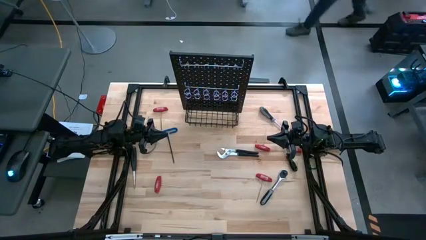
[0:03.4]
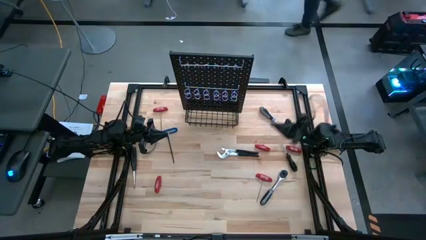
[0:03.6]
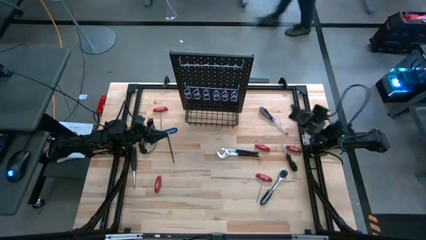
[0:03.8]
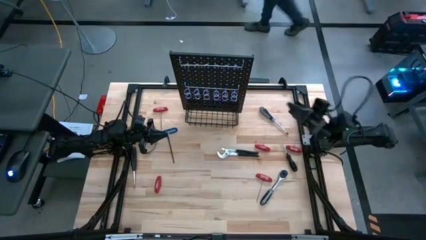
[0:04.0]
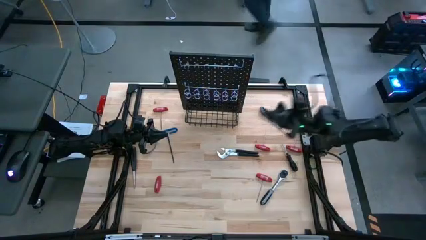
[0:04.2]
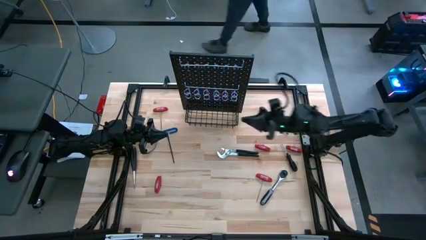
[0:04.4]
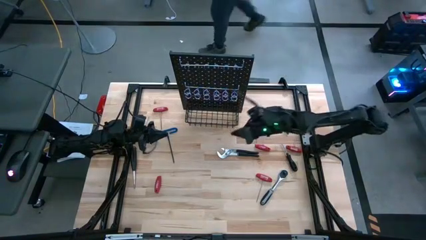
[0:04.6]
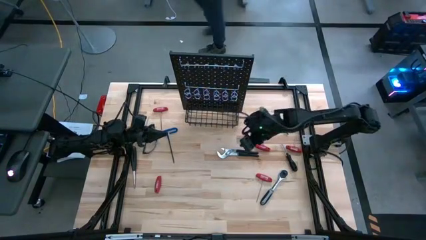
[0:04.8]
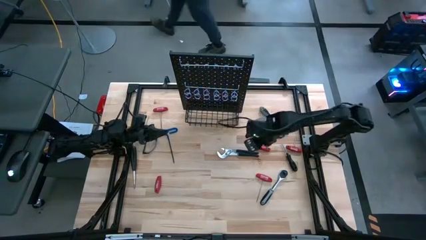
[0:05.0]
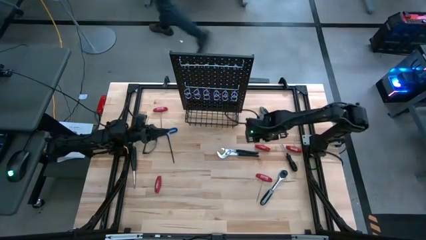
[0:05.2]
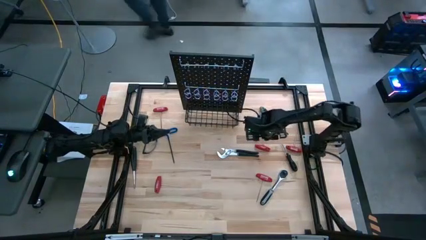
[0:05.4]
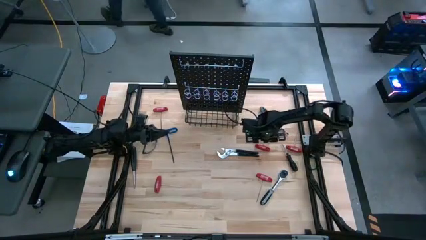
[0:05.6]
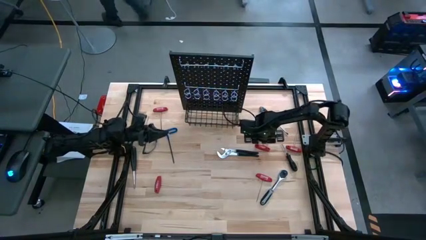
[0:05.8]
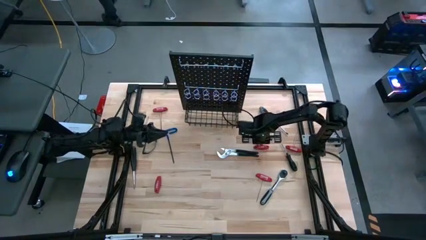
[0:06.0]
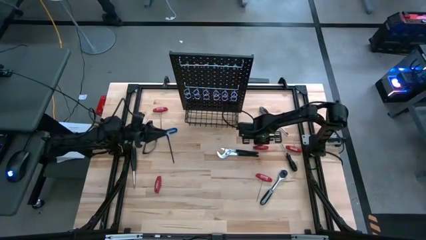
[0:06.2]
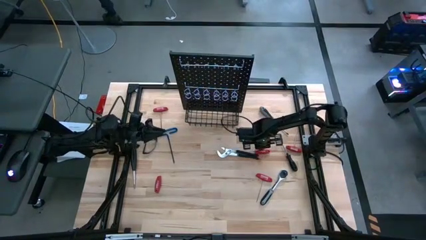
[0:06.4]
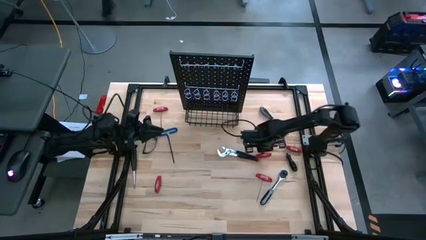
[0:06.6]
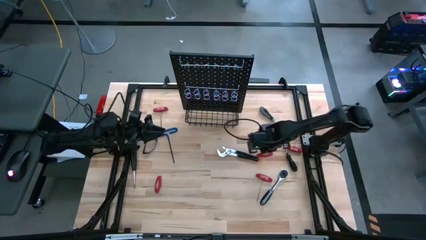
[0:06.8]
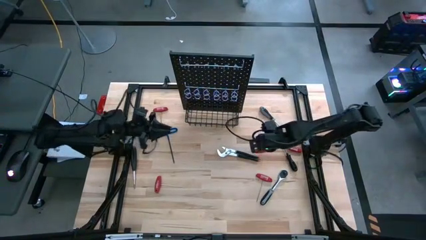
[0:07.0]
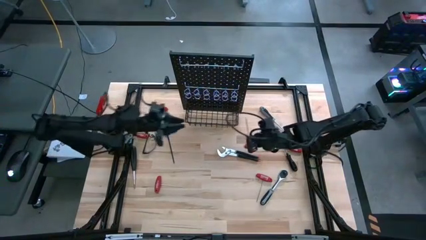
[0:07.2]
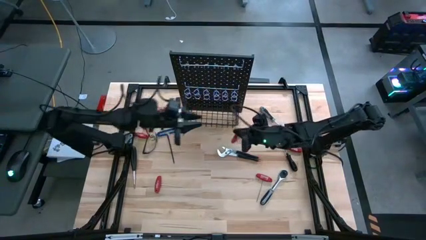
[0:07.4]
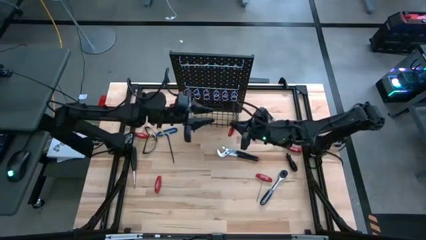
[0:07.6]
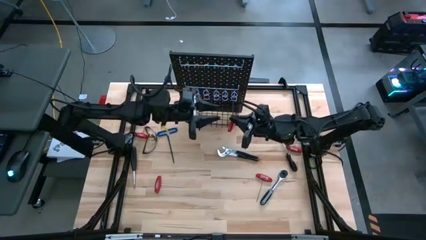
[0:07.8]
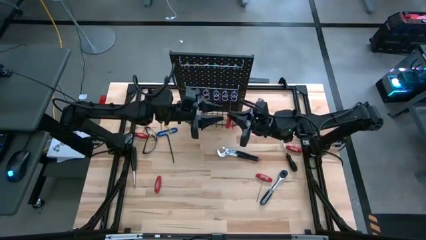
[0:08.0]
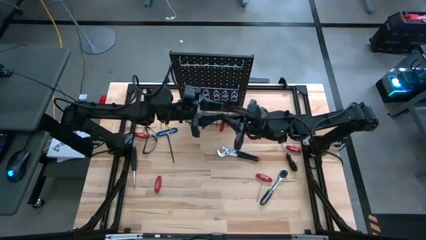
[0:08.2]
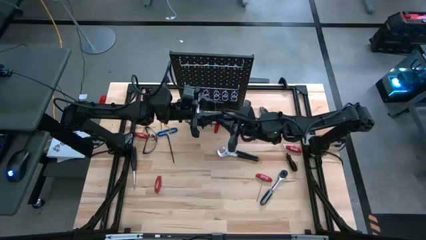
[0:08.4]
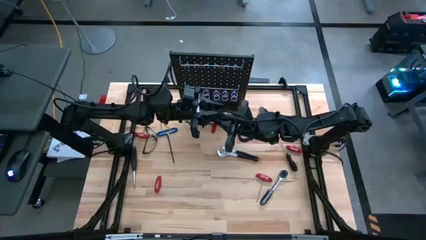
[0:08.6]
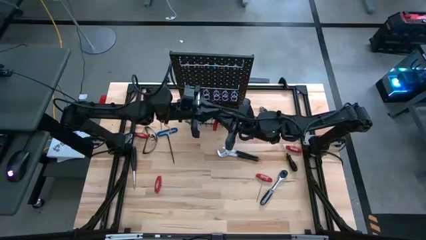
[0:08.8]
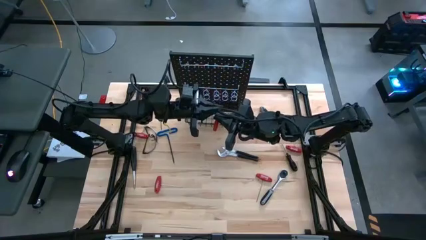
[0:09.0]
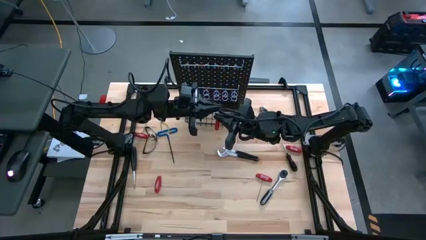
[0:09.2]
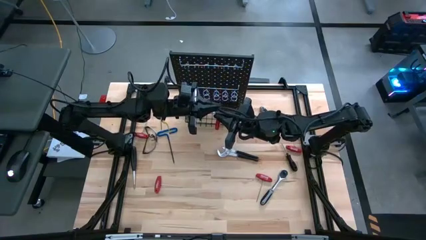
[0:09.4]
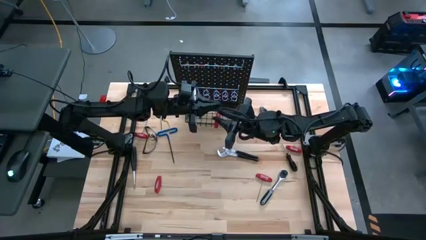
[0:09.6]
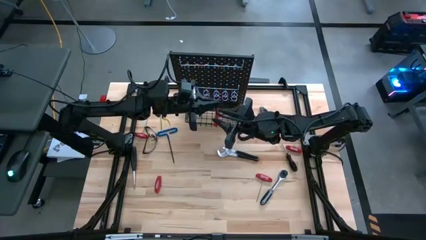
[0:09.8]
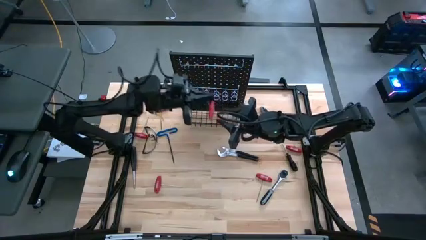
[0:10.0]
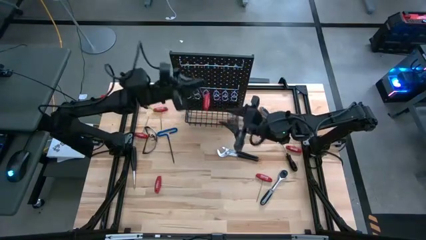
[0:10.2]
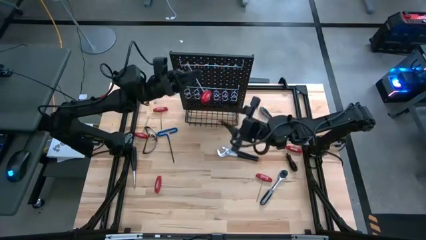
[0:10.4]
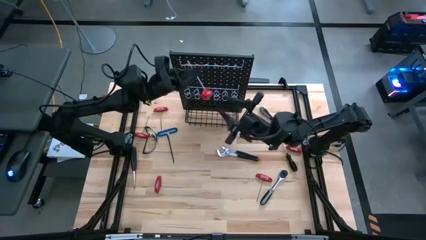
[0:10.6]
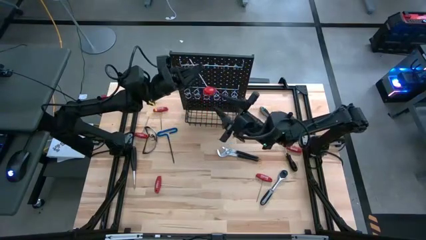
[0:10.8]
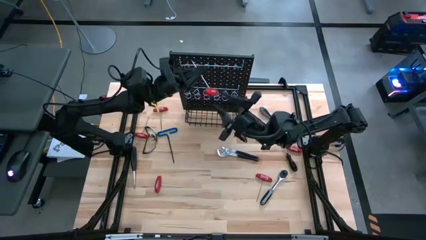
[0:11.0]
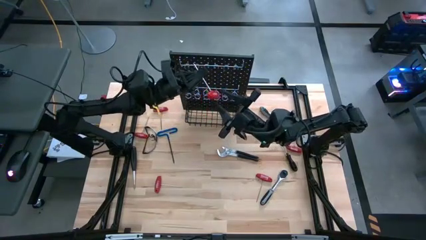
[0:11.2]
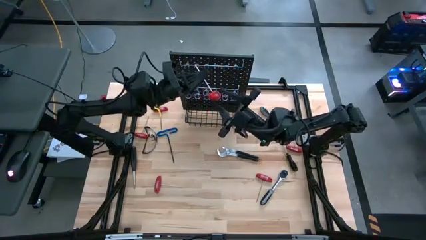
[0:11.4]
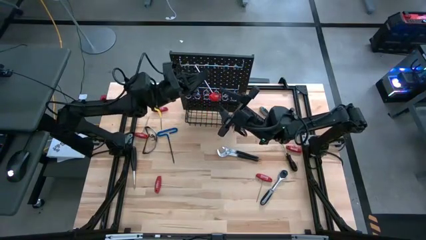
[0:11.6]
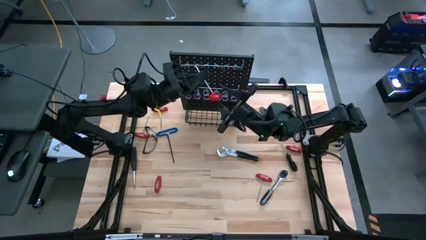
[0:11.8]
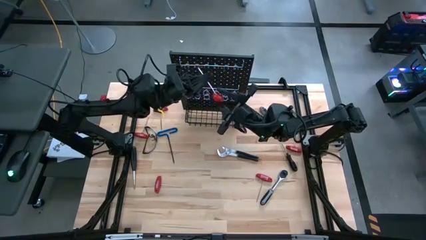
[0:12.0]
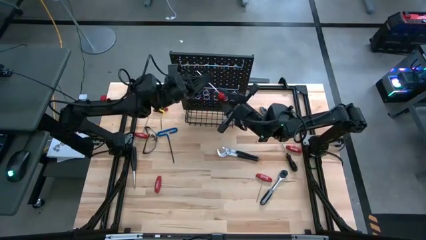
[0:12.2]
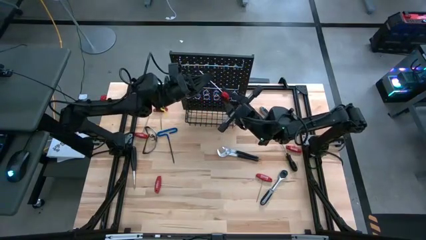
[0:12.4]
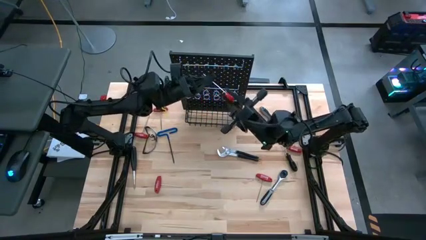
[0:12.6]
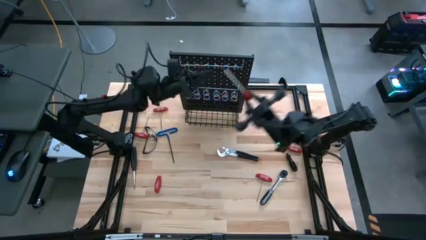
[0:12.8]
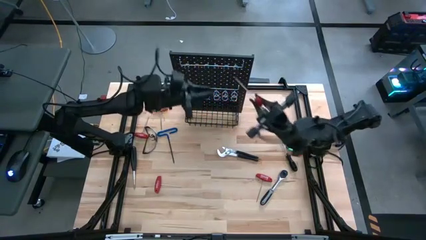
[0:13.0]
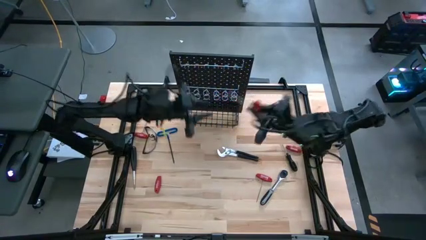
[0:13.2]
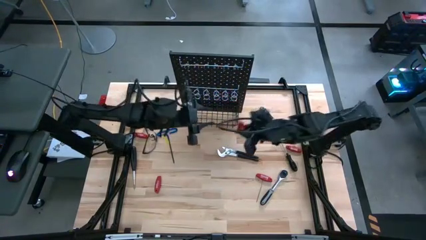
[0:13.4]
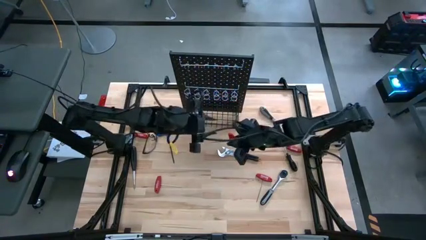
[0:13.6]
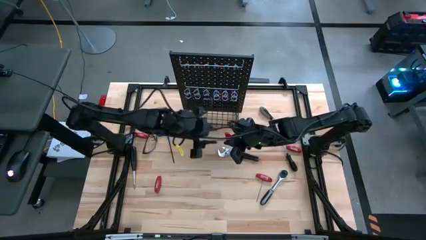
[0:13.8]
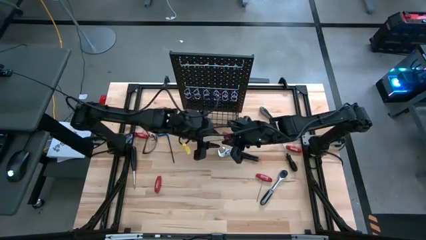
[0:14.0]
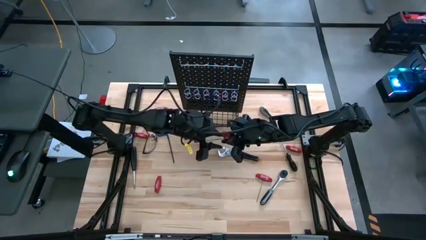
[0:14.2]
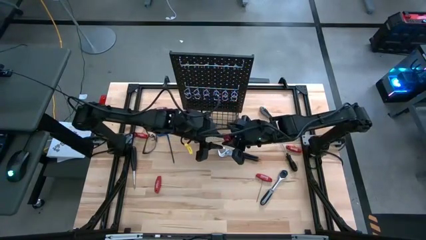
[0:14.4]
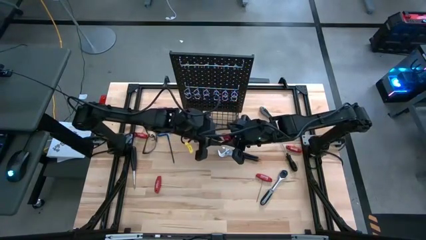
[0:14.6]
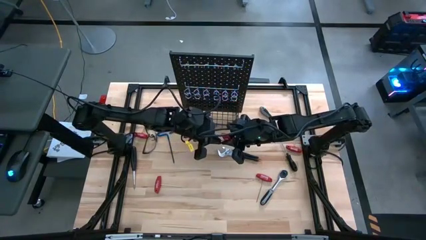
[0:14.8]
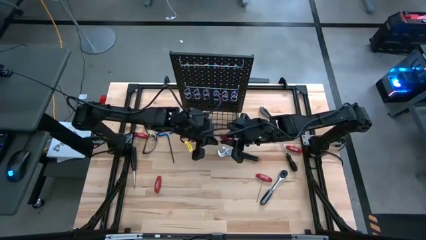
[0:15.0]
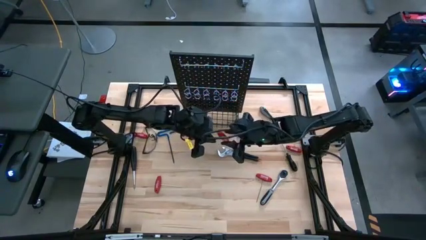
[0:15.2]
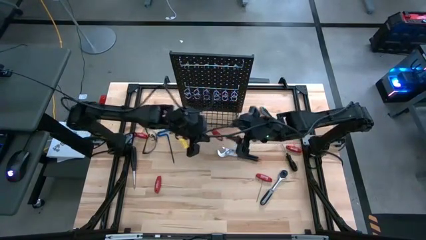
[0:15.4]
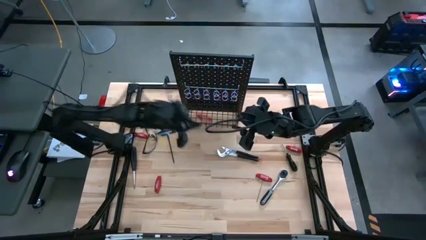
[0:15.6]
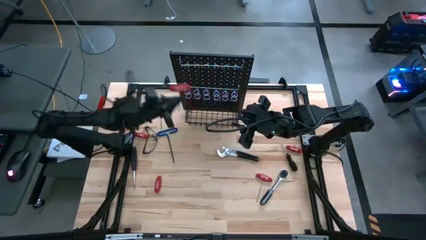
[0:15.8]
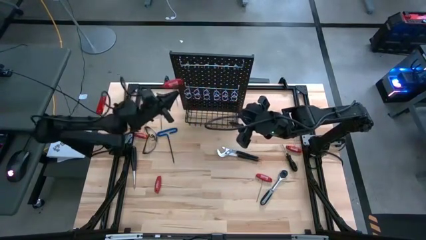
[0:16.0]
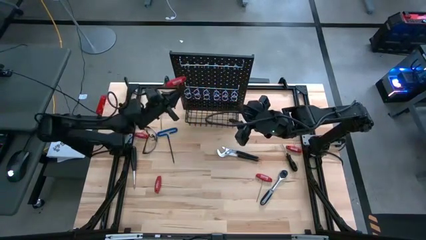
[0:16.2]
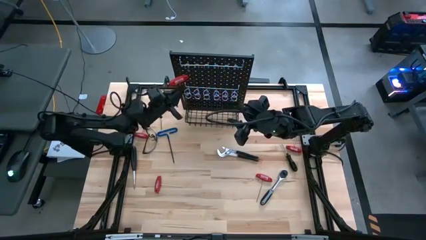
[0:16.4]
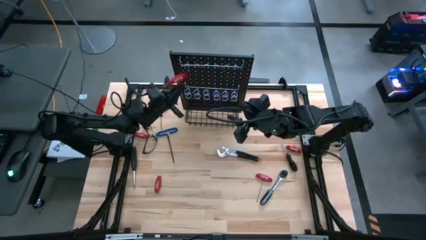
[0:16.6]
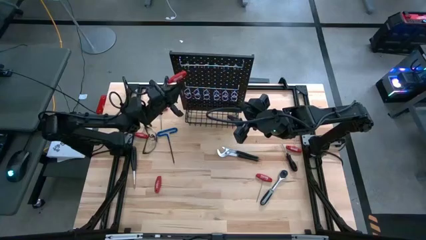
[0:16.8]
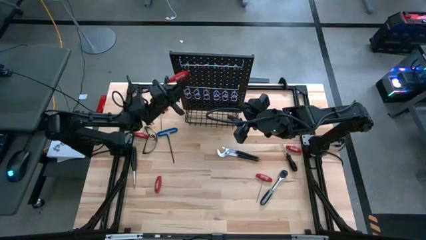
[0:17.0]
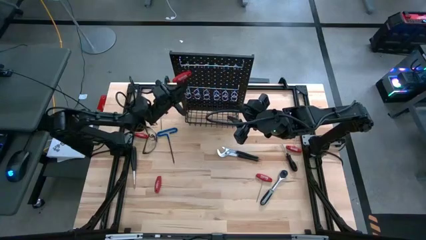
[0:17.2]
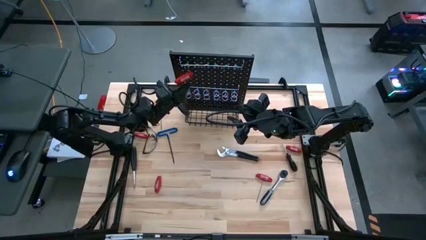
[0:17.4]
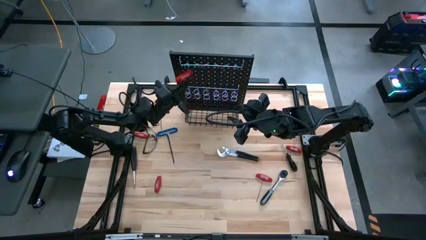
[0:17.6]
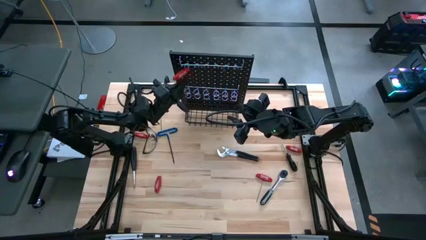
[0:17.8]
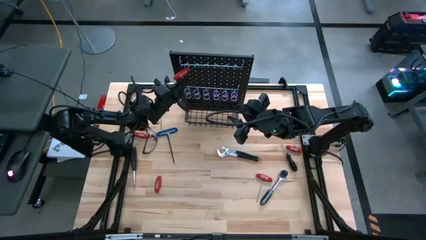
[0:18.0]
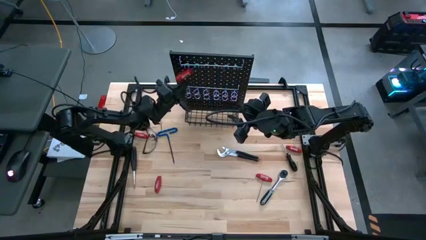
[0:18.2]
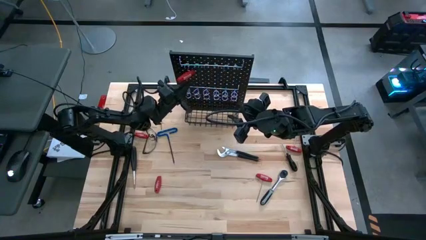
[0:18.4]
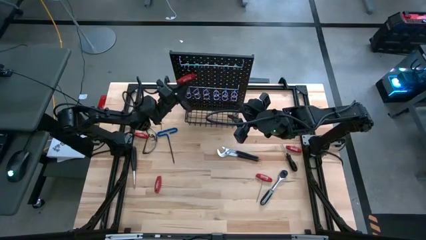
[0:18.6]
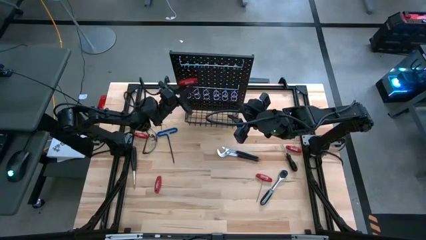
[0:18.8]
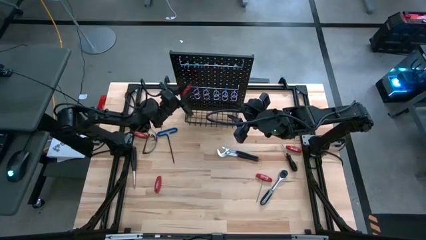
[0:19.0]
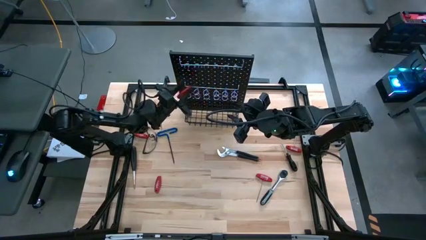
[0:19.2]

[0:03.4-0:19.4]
Task: Hang tools onto peg board
Hang the middle left red allen wrench on the pegboard
